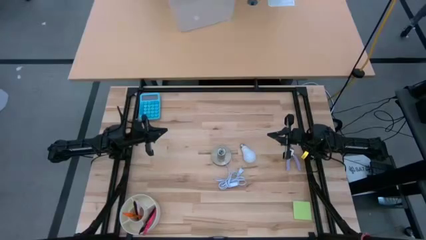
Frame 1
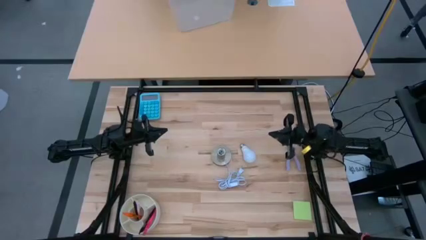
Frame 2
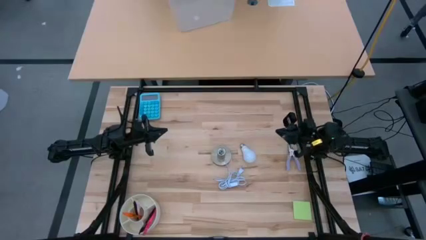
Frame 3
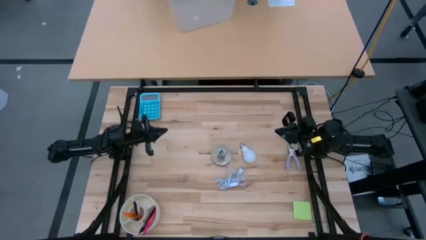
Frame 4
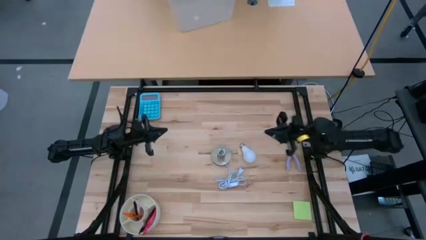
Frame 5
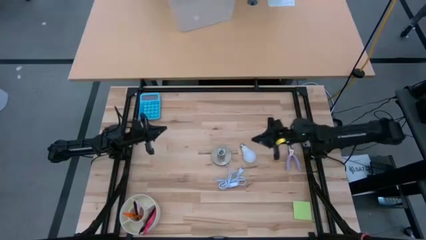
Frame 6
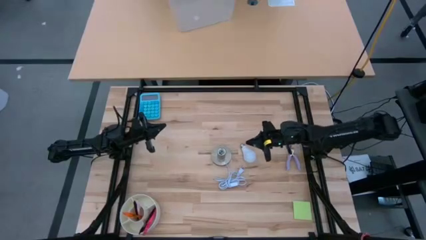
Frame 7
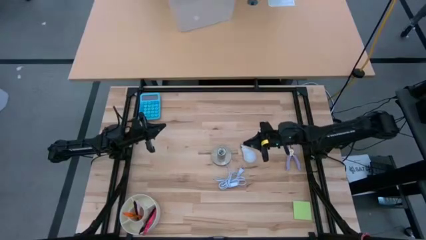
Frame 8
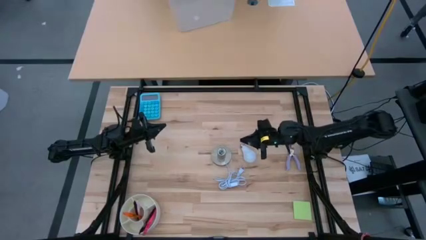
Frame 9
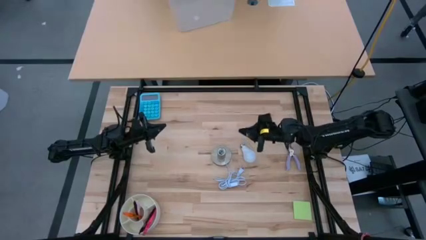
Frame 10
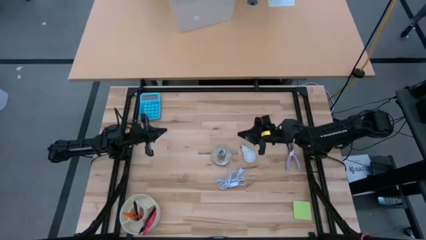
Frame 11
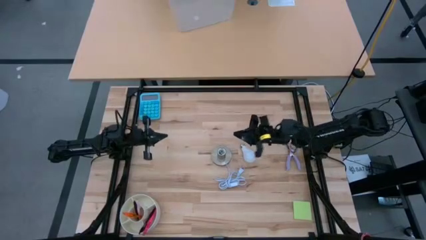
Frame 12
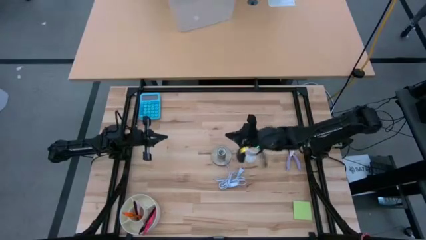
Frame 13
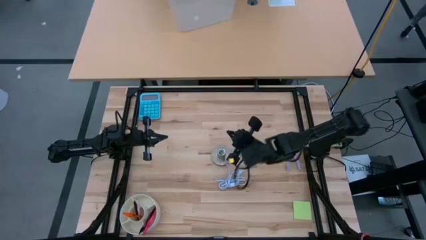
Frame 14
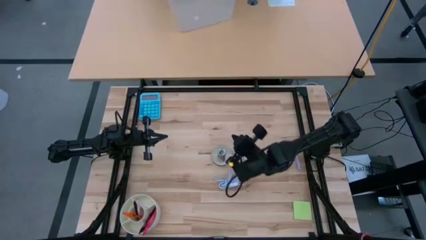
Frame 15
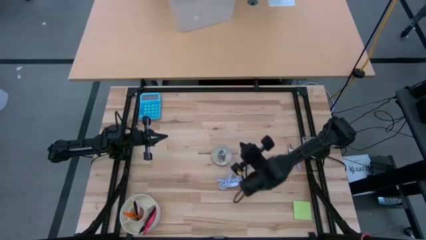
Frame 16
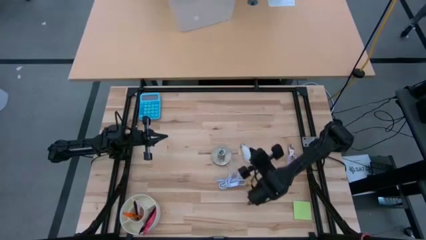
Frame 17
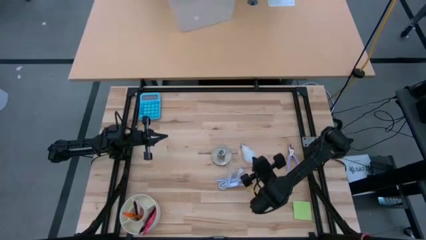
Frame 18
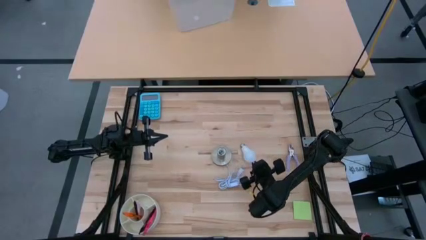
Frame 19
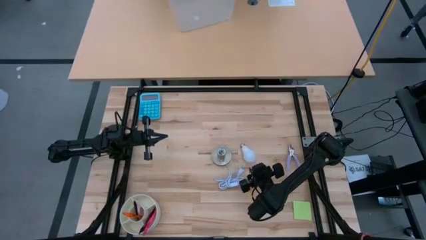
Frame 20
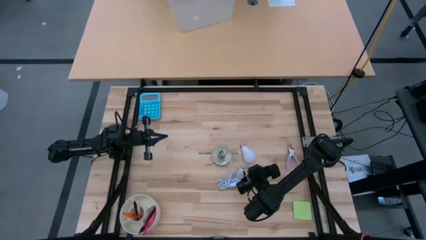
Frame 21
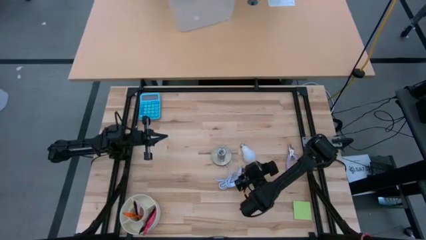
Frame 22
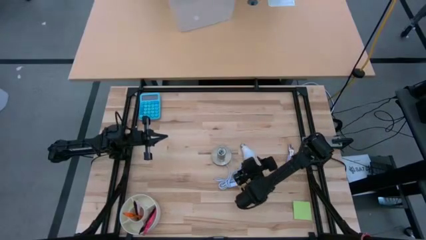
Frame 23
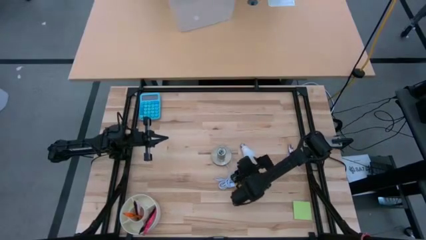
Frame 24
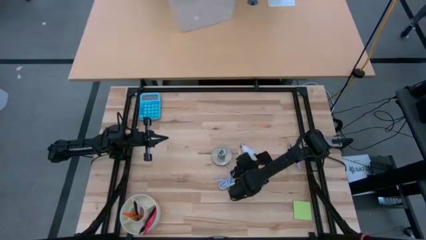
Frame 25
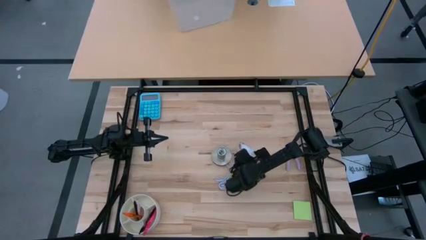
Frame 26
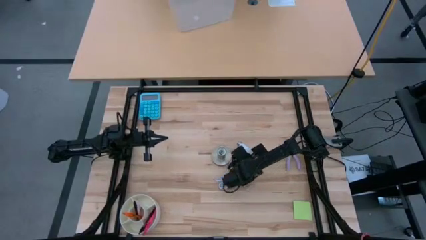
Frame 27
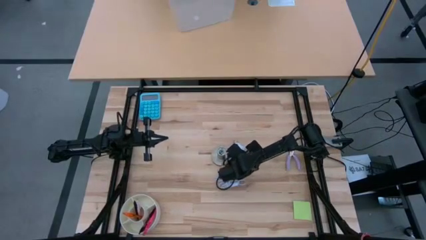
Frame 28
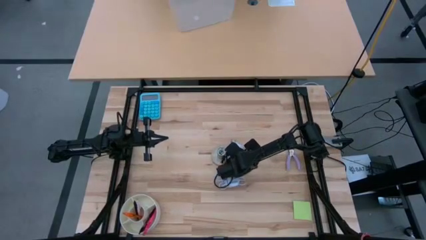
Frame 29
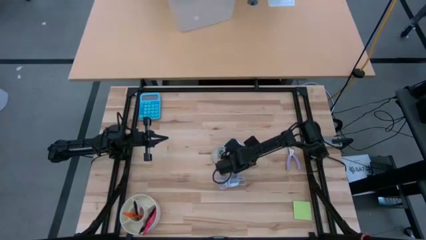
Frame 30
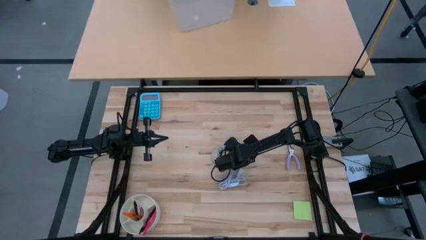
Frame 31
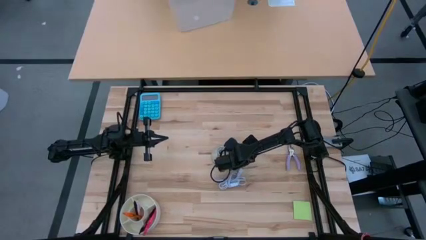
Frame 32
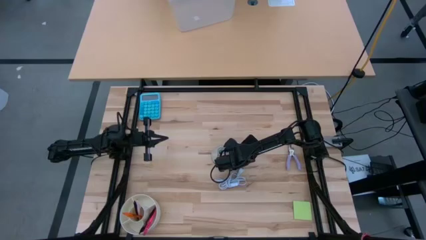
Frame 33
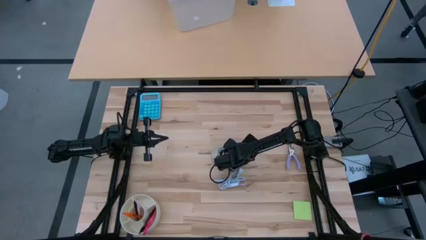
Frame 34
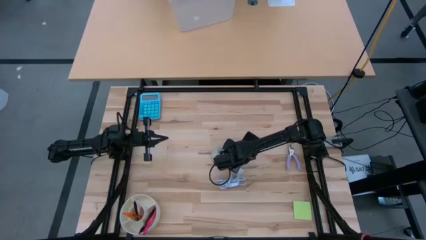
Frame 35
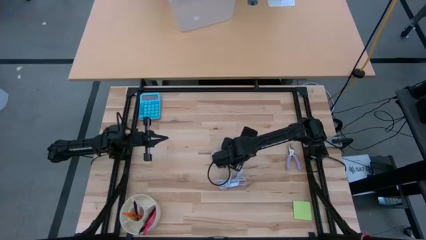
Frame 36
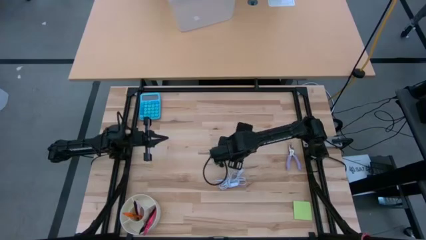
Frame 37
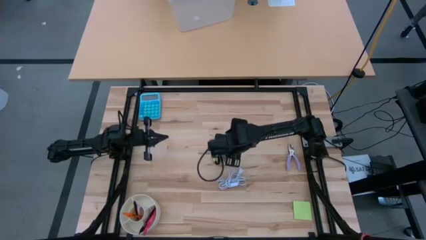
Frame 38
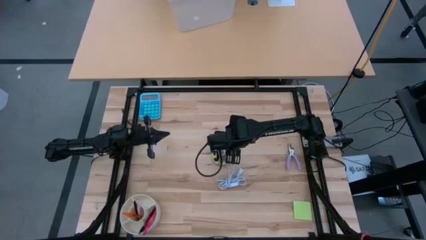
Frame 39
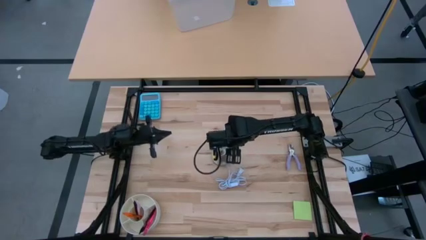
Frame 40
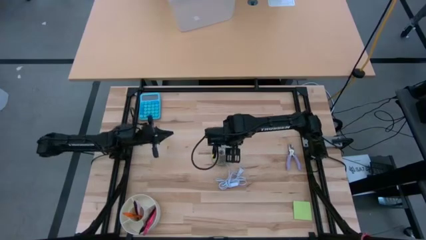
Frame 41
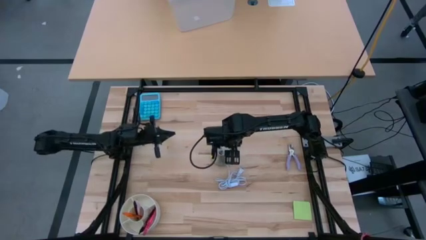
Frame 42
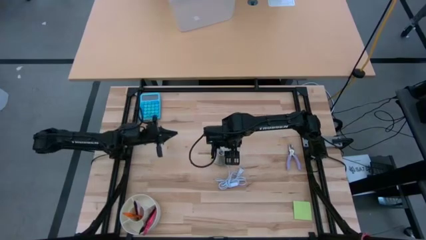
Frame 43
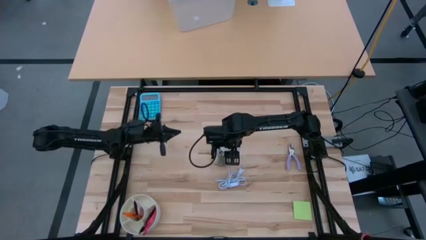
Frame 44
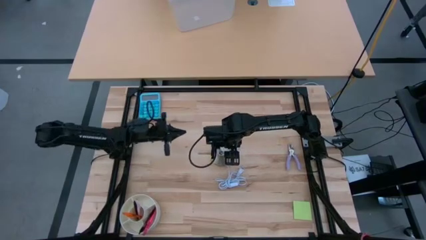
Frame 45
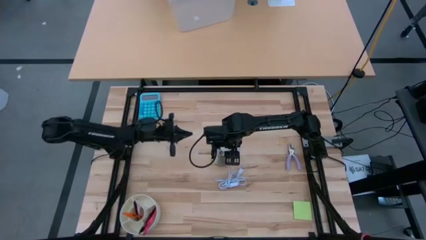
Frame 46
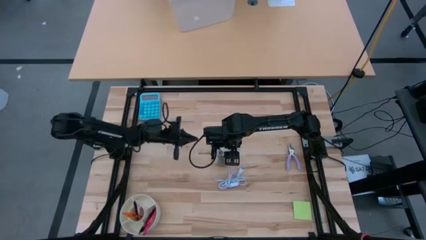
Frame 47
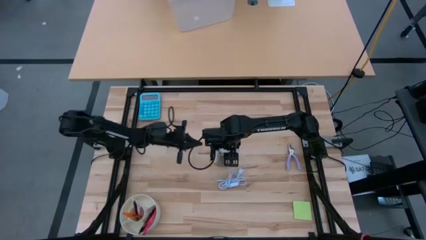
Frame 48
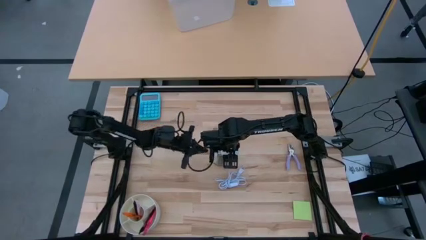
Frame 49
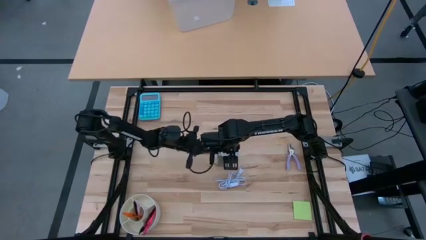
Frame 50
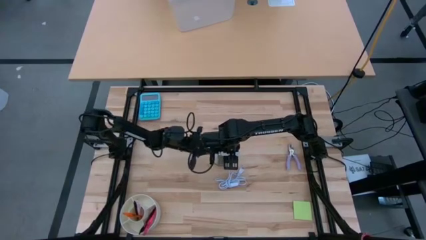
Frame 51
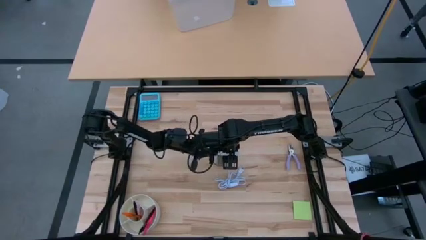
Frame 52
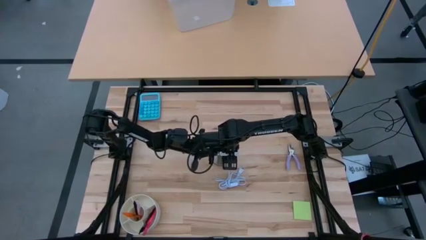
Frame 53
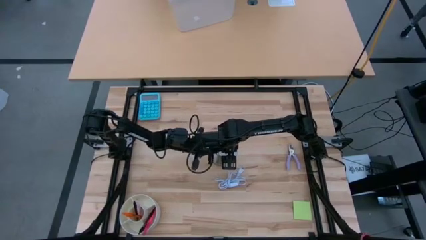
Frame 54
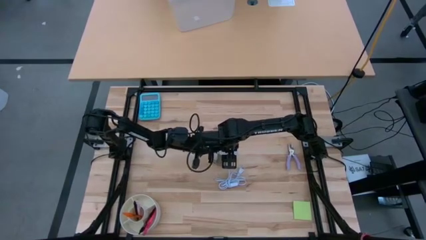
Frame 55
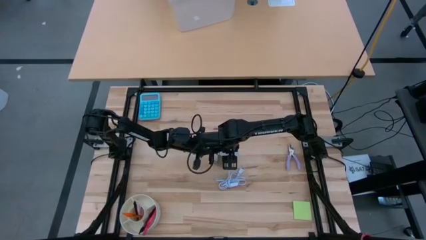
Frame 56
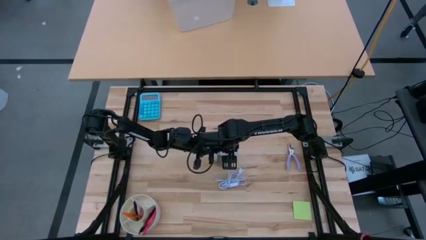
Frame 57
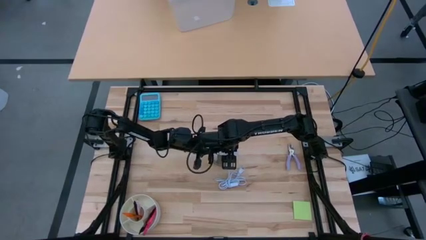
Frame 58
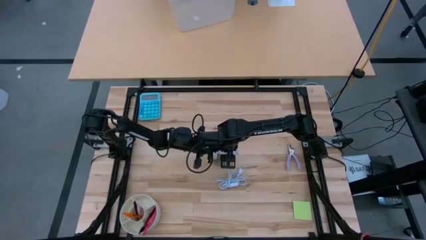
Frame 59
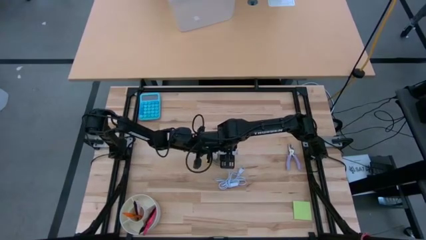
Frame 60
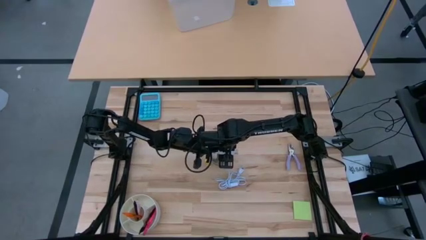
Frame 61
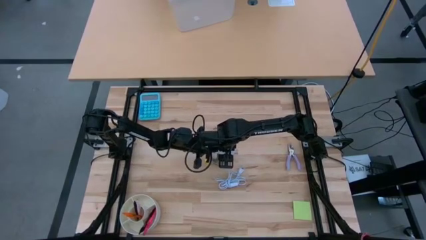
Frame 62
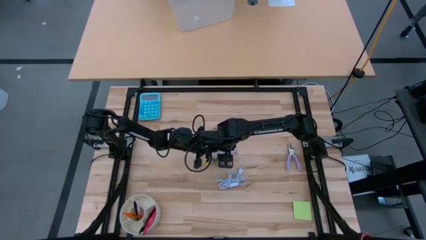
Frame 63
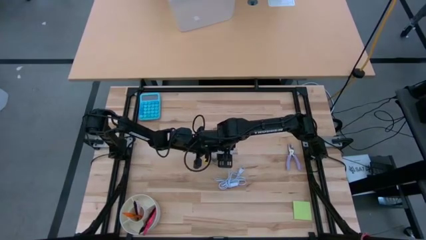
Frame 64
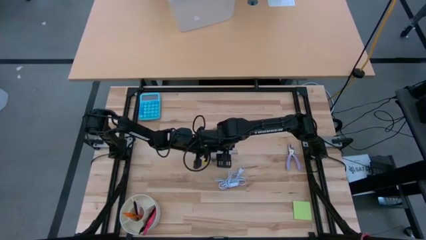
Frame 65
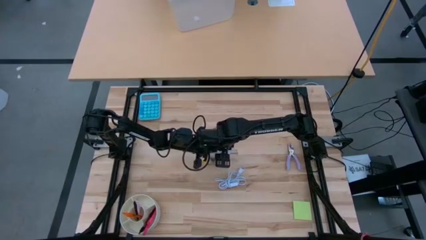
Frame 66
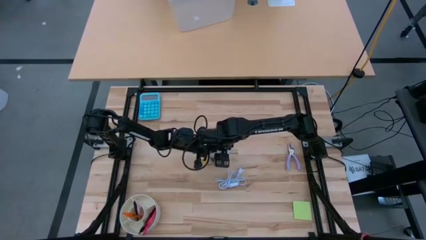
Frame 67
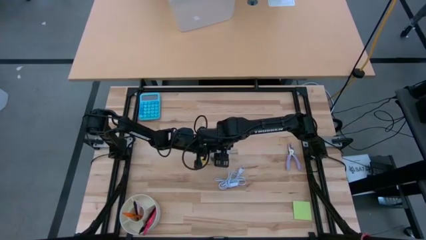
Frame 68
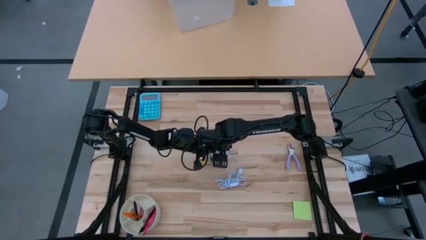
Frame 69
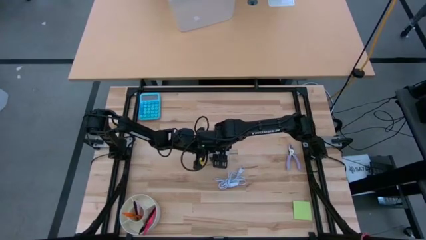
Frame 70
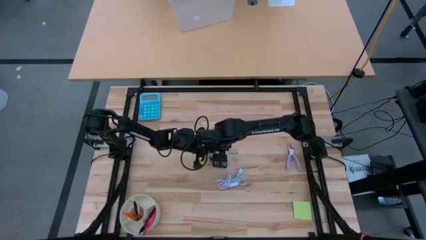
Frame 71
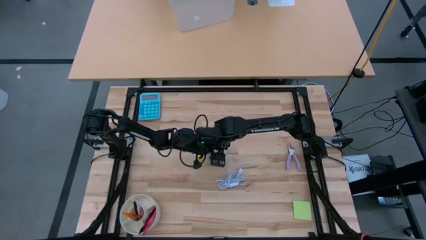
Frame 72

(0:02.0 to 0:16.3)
Task: Screw lightbulb
Insert the light bulb into the lamp
